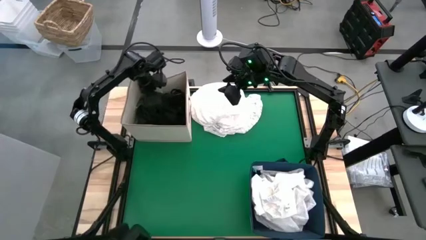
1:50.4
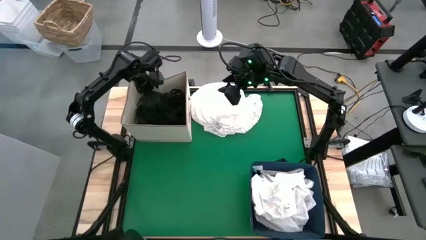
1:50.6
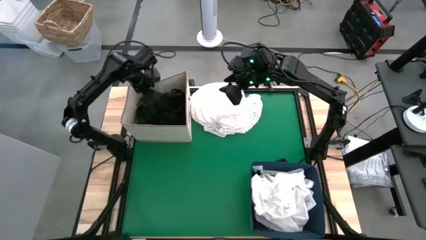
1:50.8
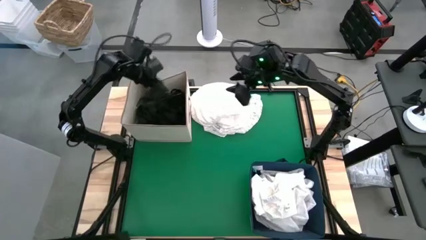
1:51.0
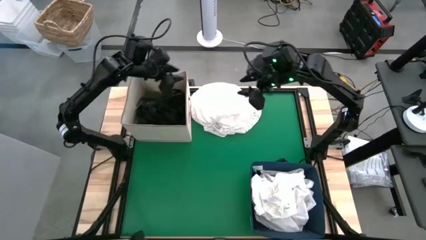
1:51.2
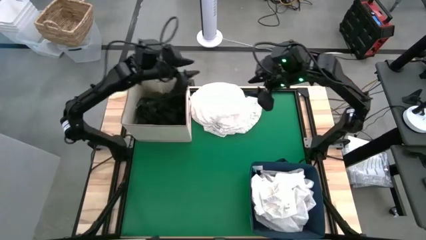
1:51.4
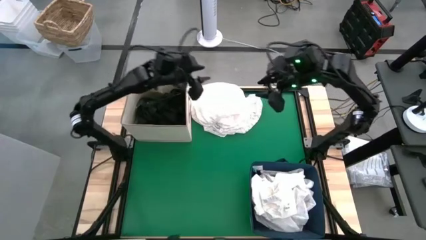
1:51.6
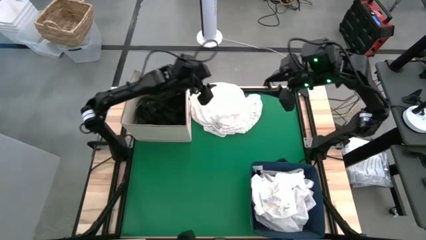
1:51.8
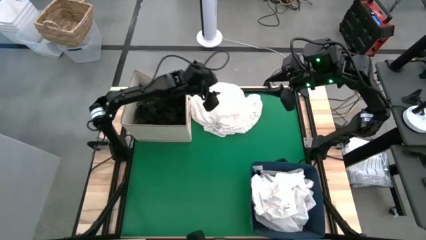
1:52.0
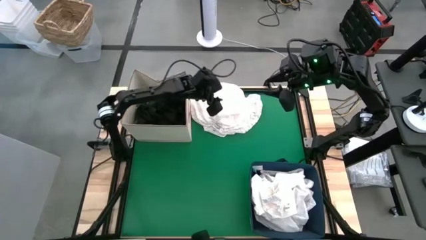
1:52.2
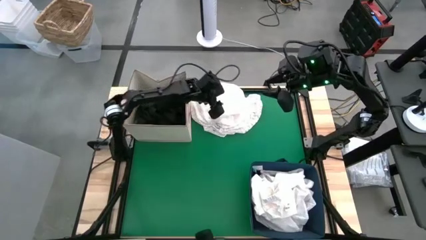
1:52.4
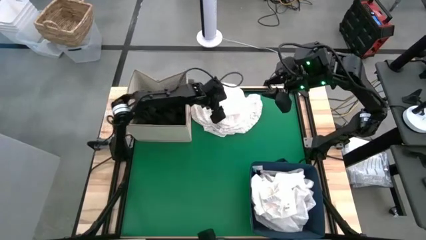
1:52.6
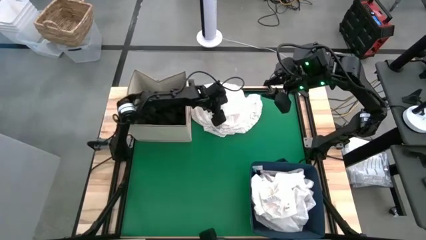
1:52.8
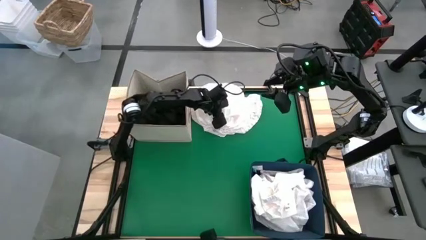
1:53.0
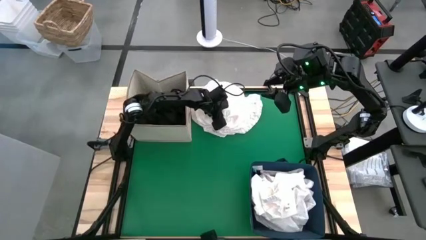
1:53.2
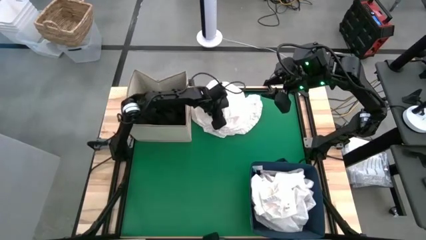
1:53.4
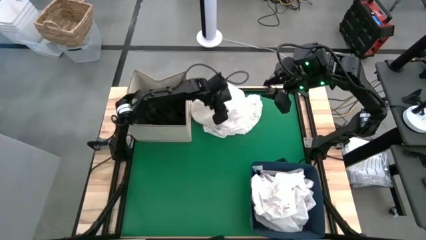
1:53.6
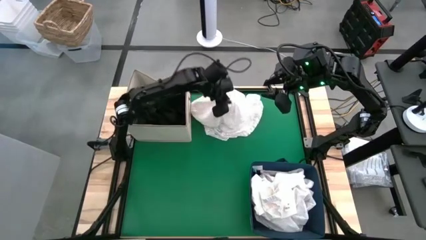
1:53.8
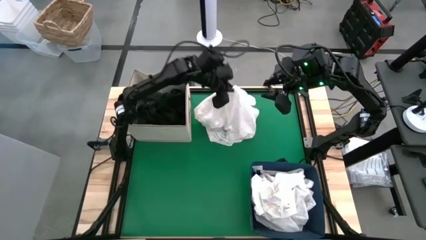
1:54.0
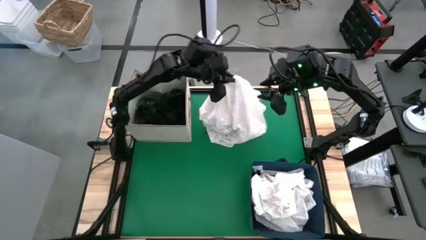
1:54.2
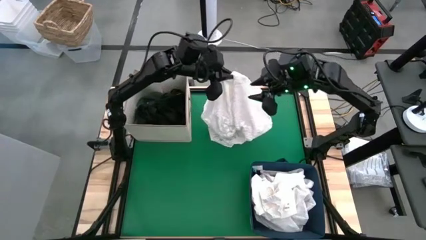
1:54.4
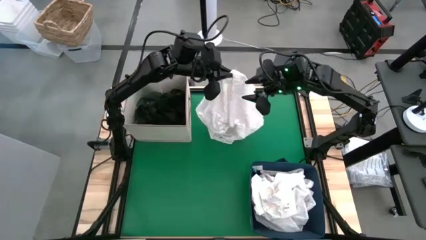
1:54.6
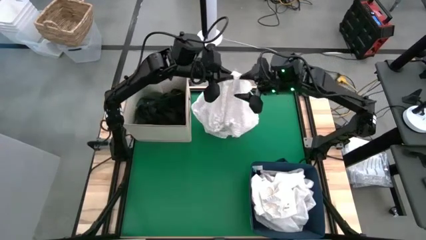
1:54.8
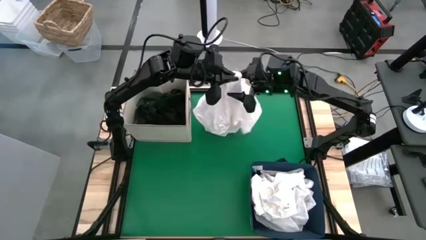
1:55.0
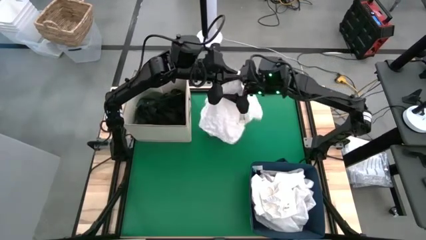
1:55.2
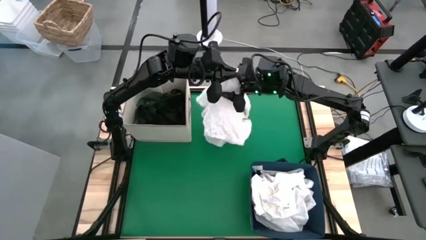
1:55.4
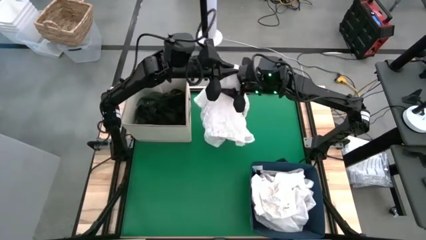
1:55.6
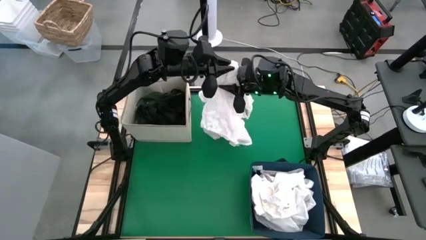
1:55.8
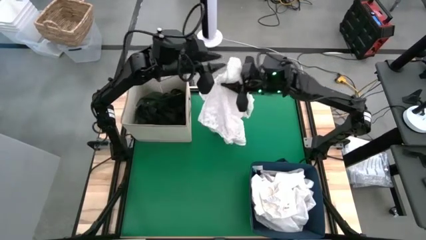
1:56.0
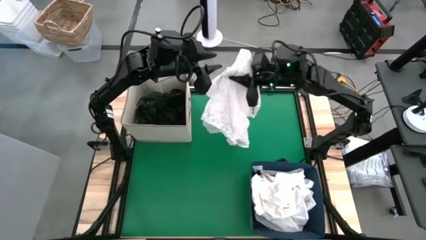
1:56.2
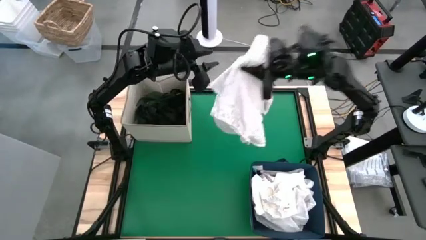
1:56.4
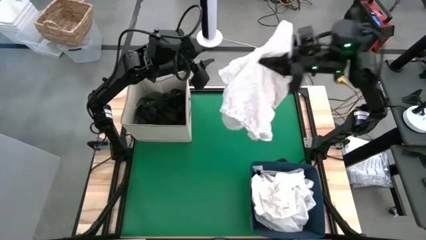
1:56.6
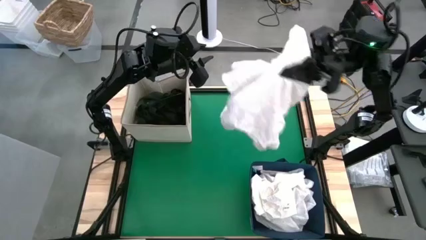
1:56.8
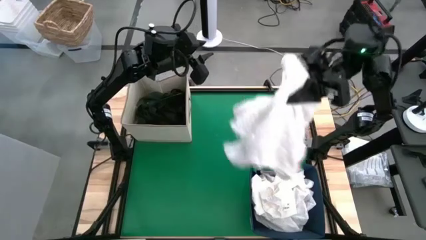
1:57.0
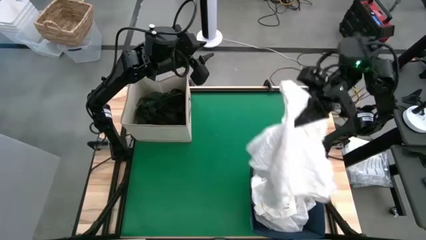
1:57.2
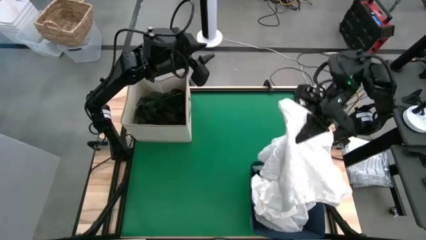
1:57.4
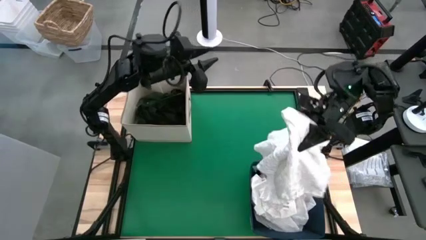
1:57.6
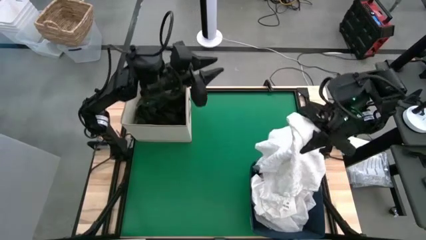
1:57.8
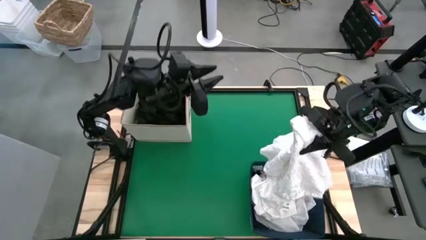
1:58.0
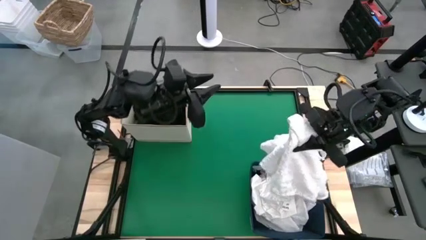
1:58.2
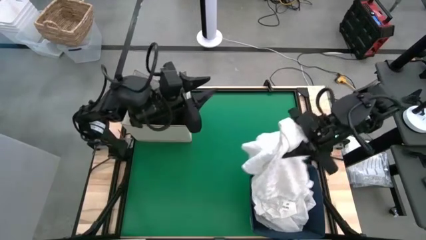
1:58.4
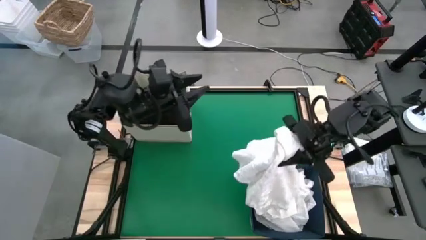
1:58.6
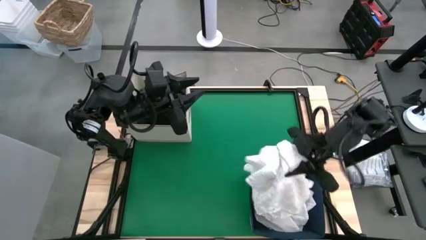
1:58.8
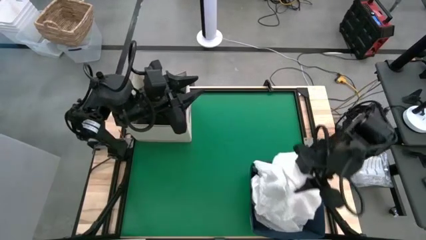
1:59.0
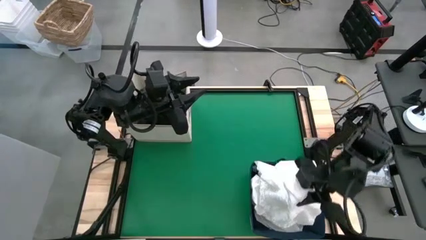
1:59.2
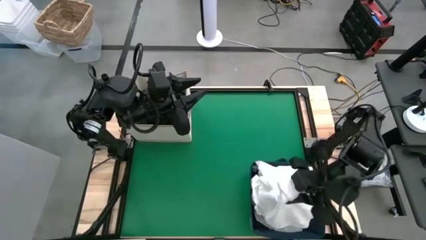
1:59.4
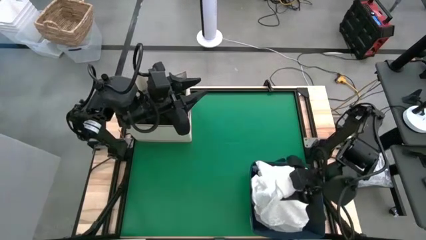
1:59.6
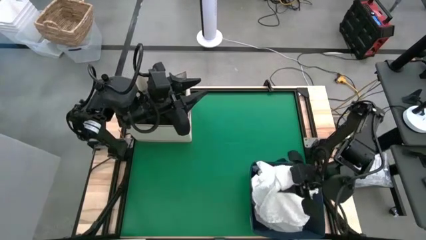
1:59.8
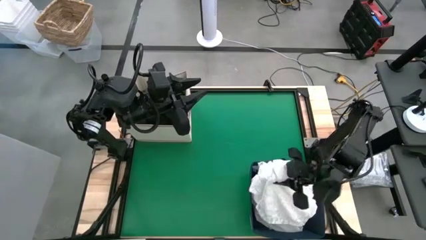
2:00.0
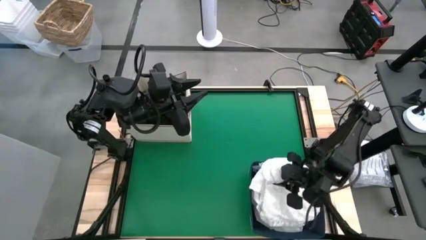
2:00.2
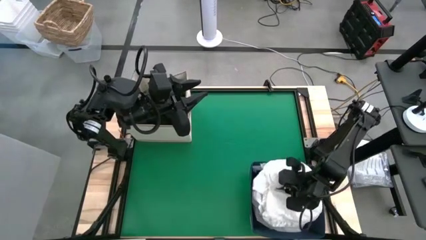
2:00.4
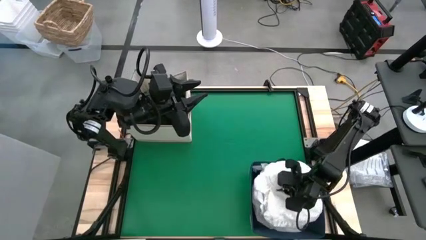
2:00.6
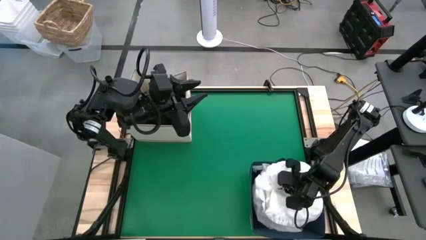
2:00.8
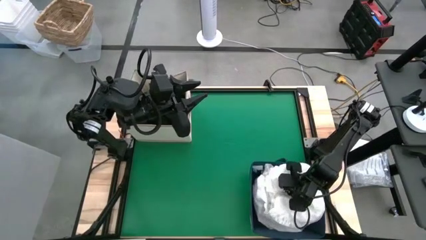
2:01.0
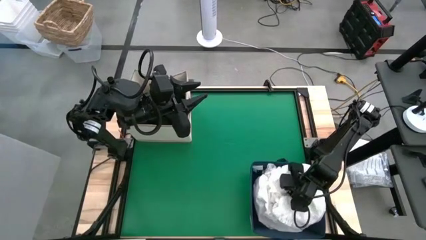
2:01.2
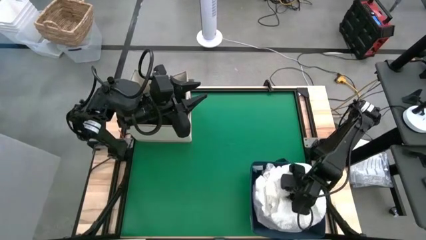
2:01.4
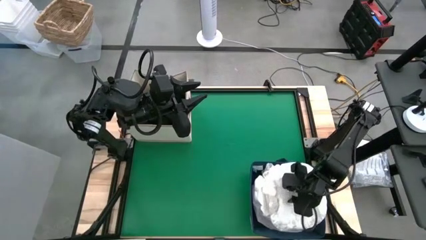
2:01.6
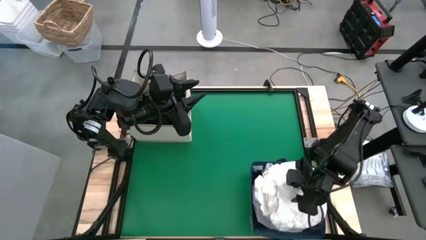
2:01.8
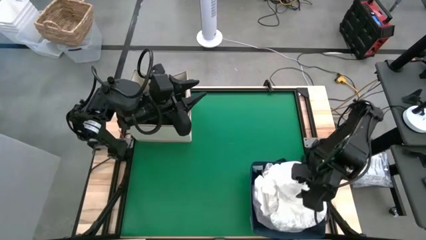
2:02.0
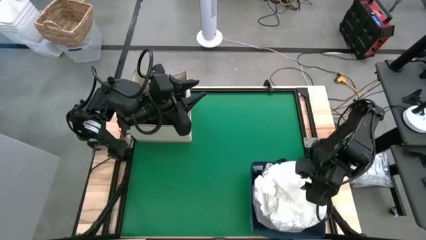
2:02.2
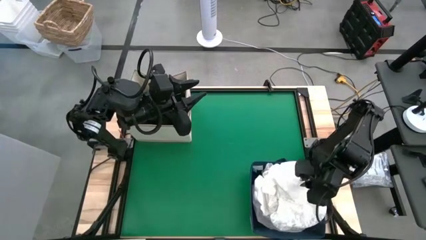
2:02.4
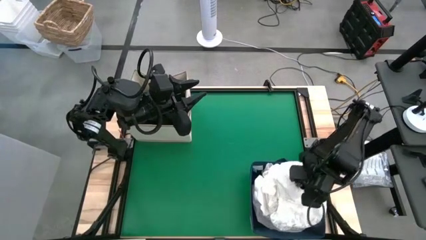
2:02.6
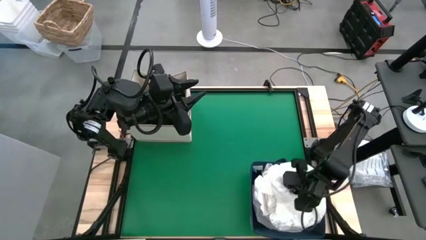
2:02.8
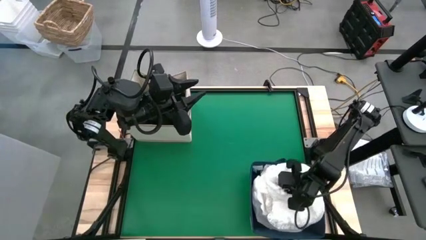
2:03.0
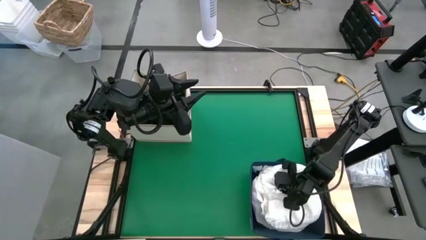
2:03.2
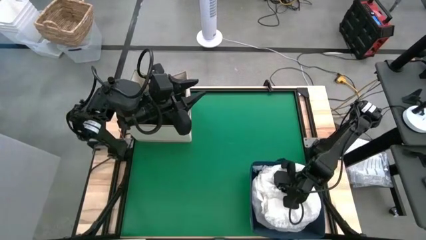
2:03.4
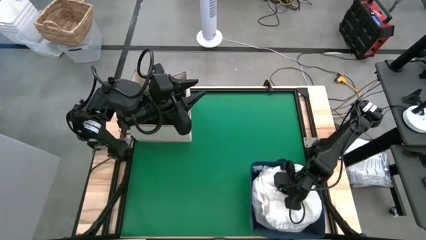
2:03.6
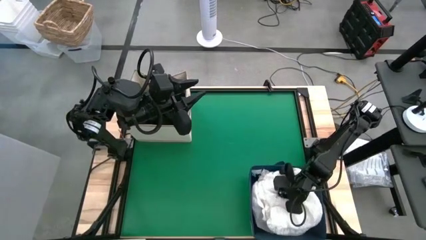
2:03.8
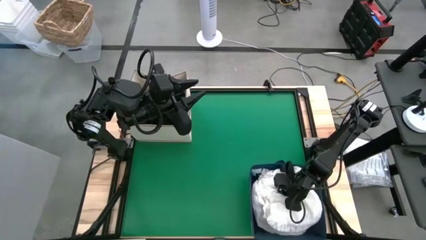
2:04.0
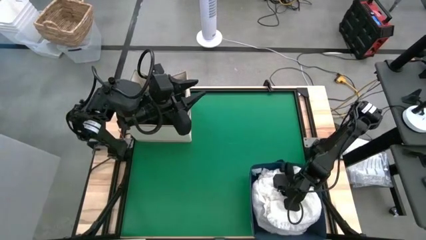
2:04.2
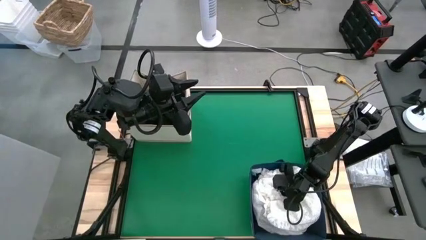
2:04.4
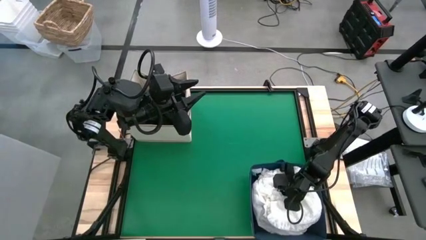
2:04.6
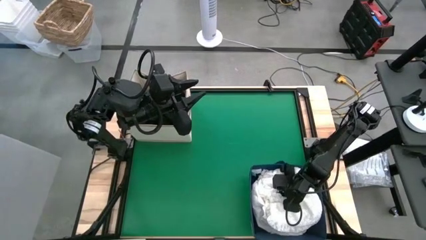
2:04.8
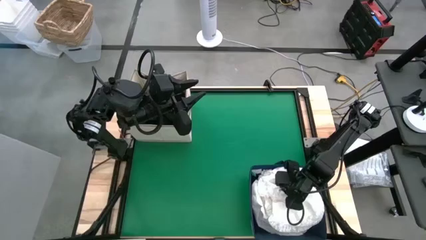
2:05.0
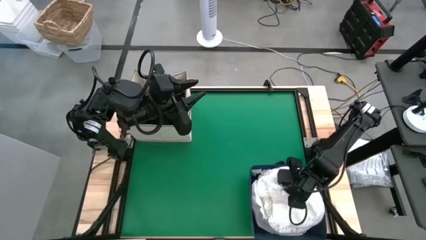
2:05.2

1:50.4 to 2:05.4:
Put the white cloth into the blue bin
